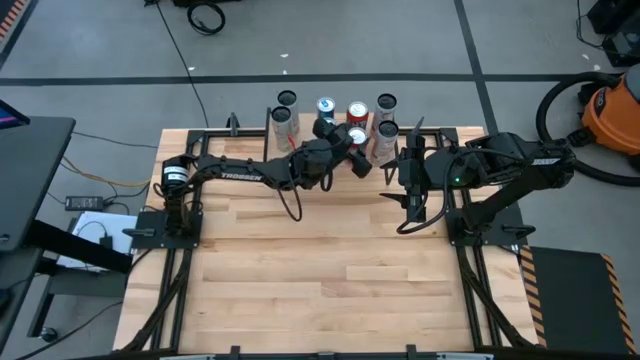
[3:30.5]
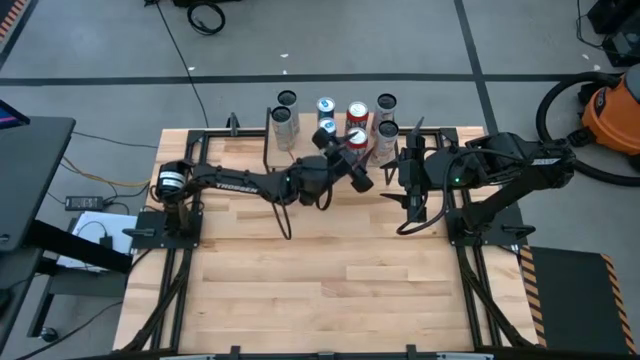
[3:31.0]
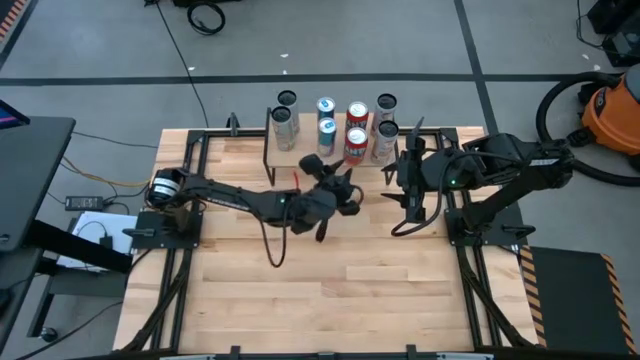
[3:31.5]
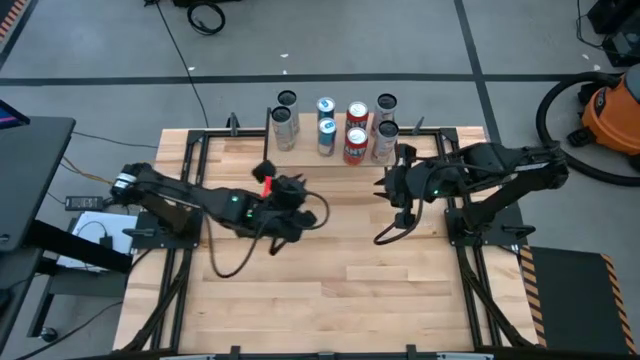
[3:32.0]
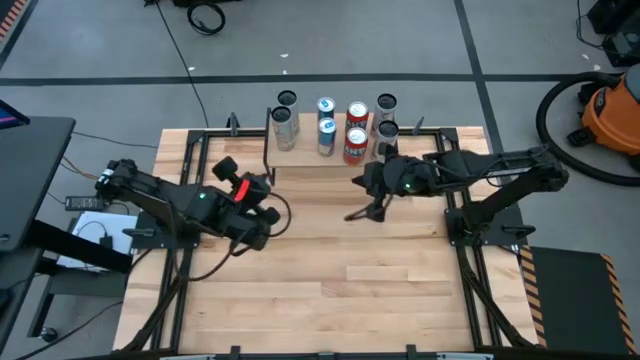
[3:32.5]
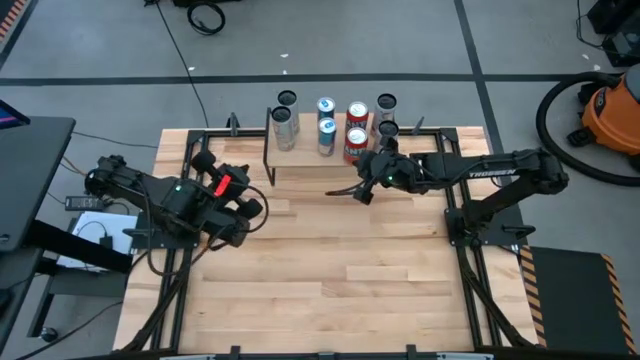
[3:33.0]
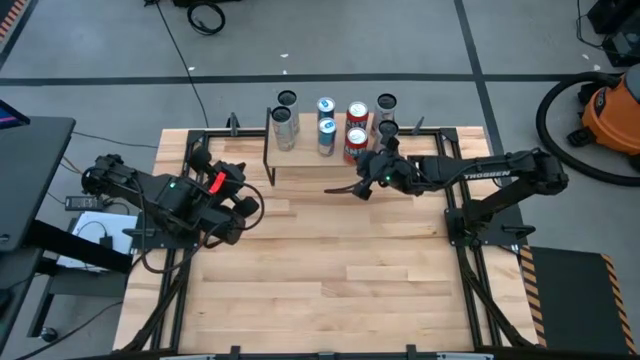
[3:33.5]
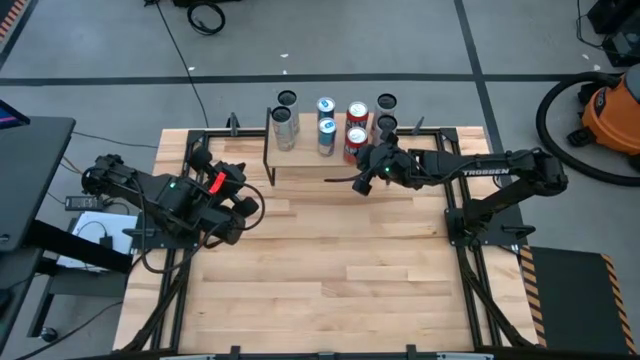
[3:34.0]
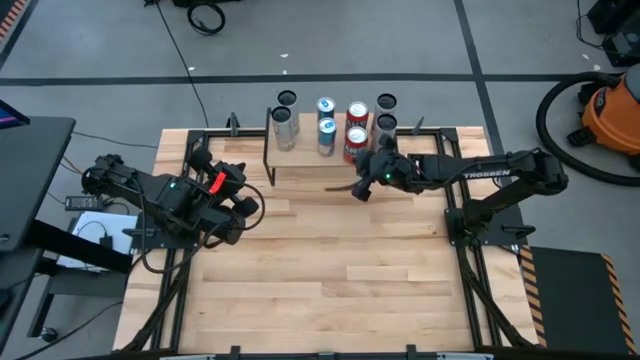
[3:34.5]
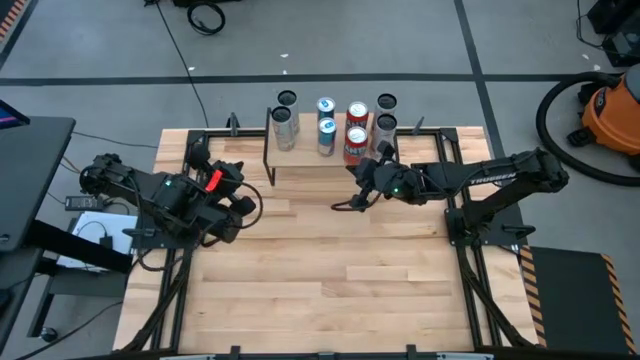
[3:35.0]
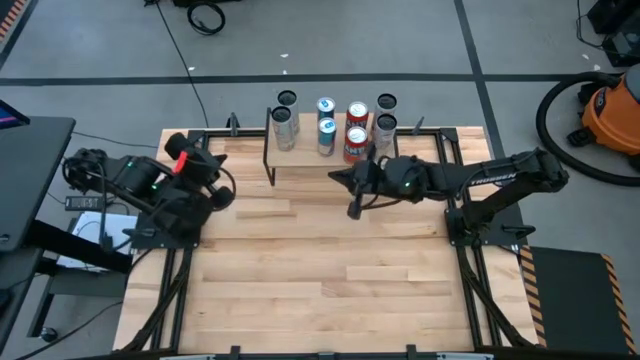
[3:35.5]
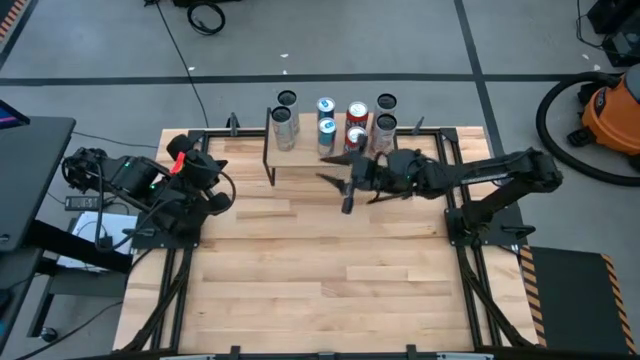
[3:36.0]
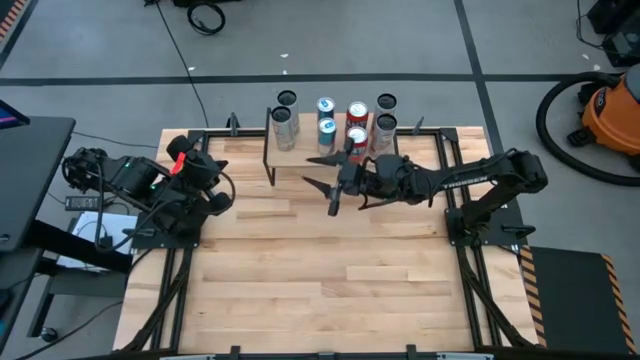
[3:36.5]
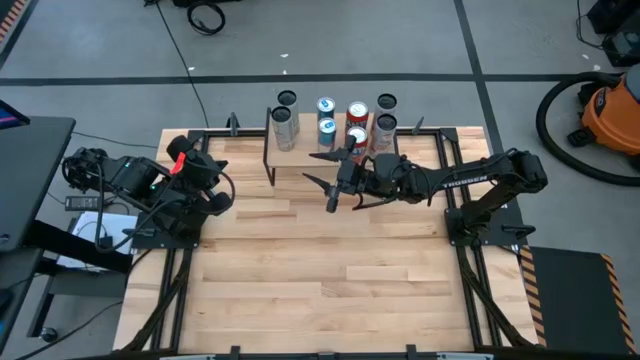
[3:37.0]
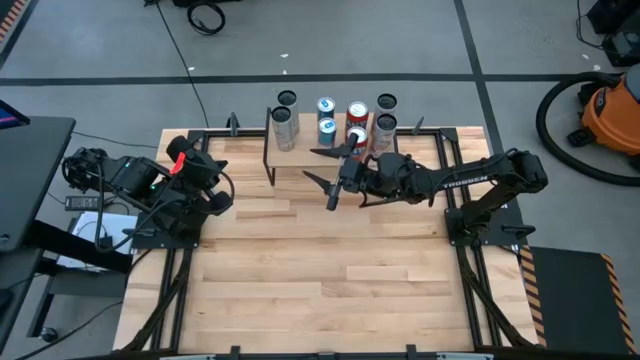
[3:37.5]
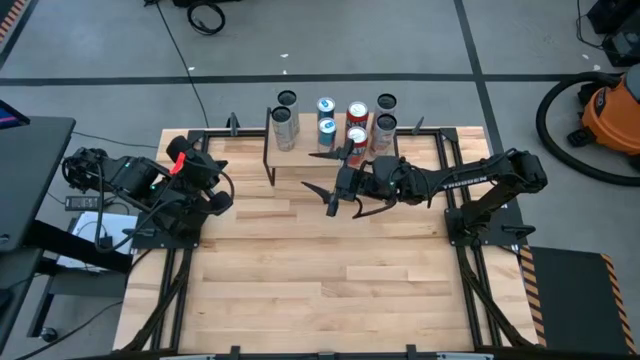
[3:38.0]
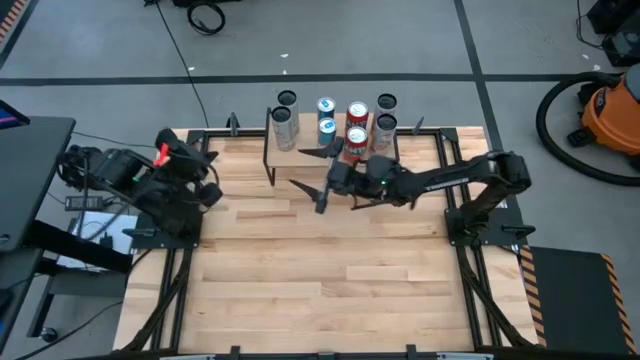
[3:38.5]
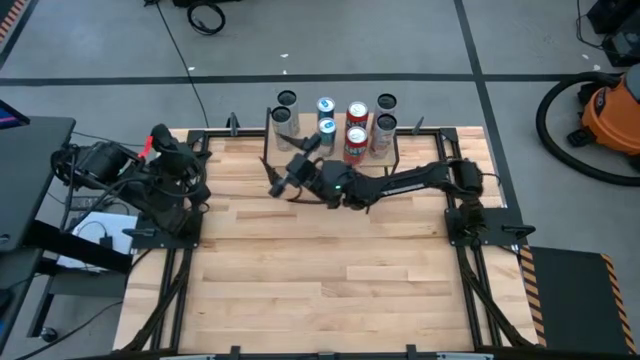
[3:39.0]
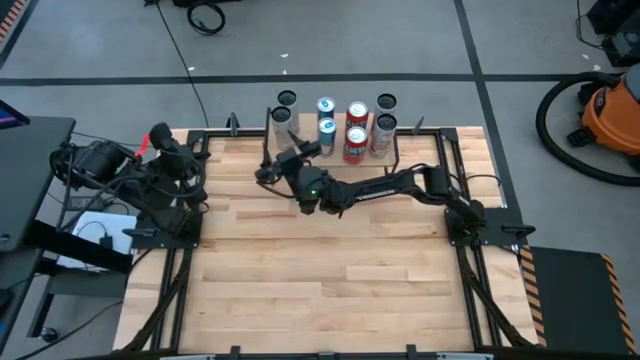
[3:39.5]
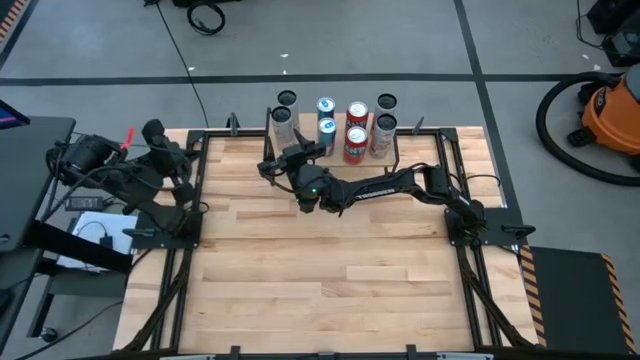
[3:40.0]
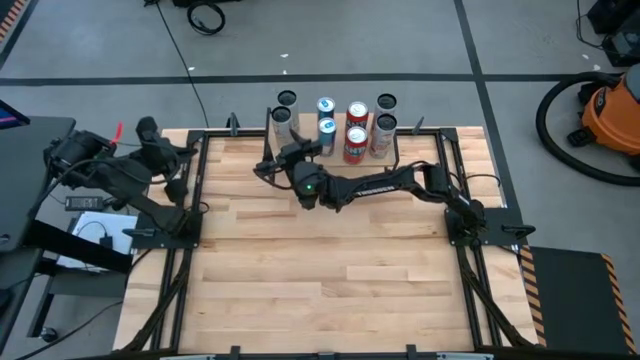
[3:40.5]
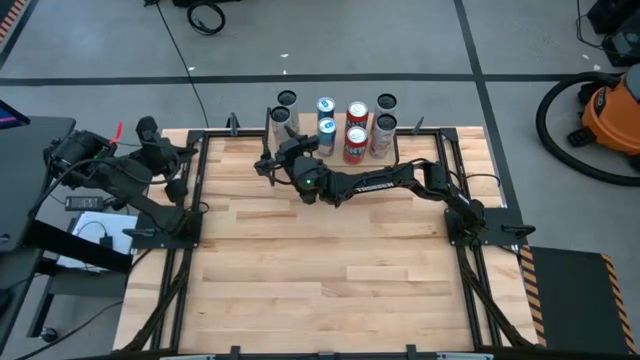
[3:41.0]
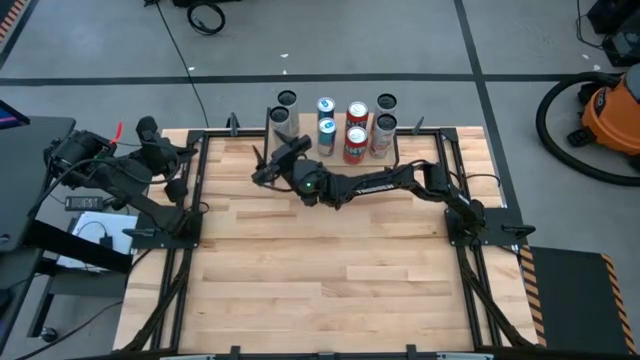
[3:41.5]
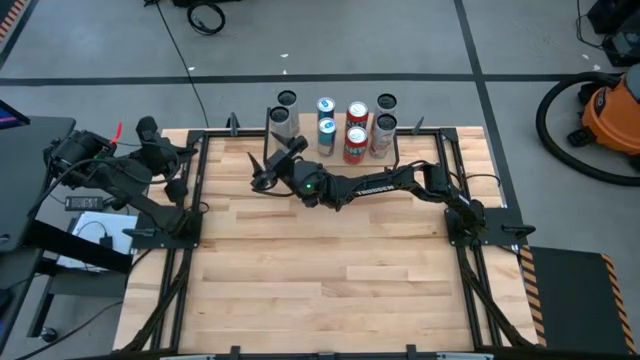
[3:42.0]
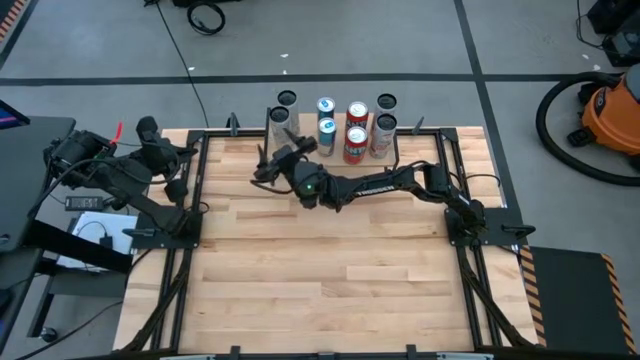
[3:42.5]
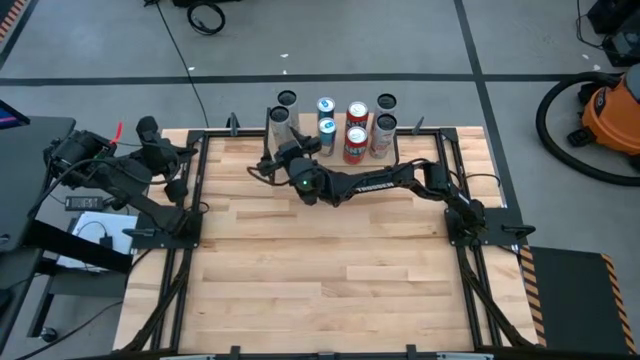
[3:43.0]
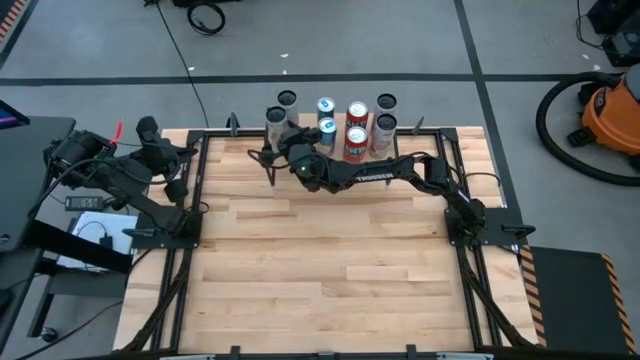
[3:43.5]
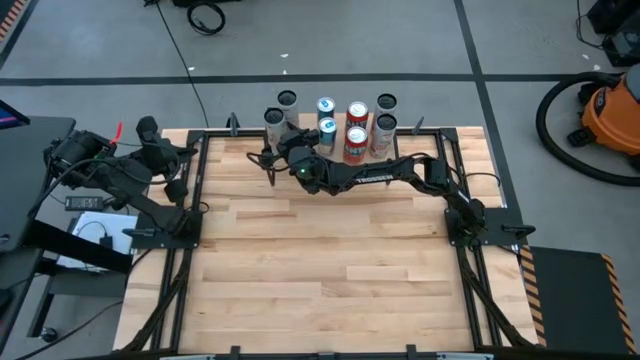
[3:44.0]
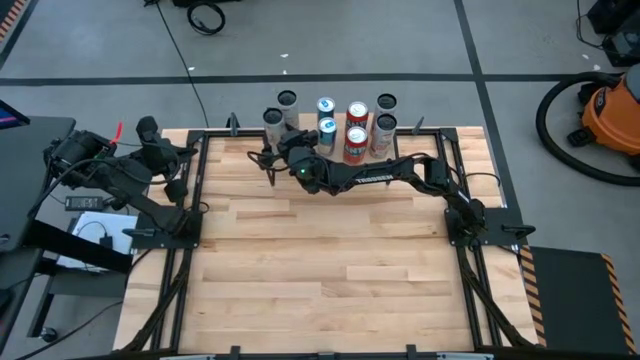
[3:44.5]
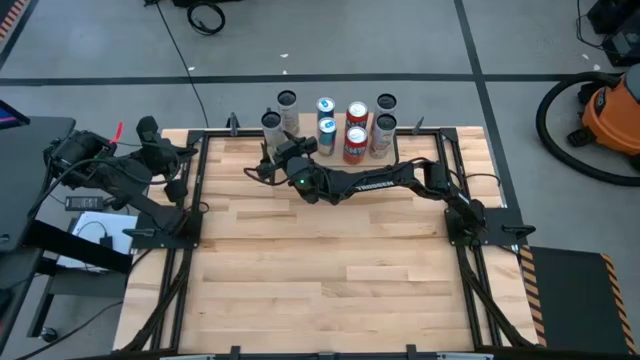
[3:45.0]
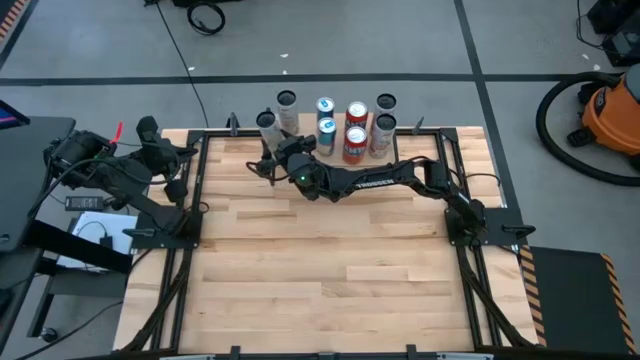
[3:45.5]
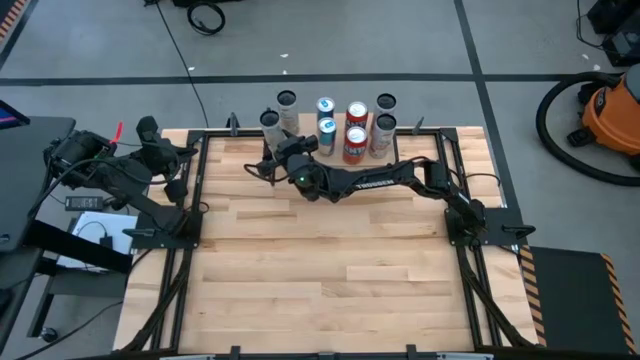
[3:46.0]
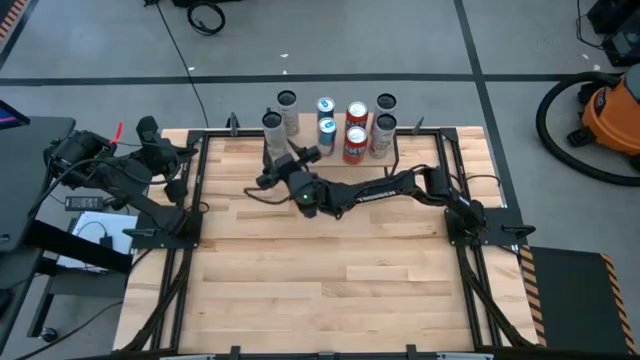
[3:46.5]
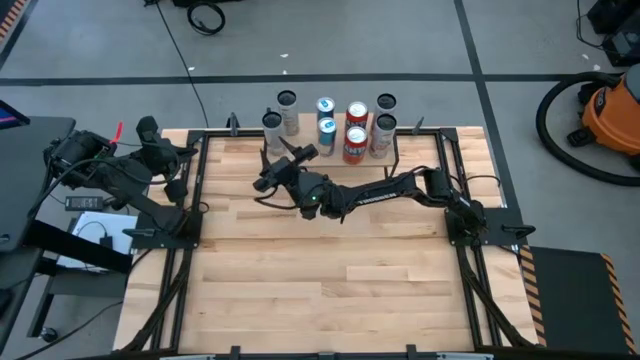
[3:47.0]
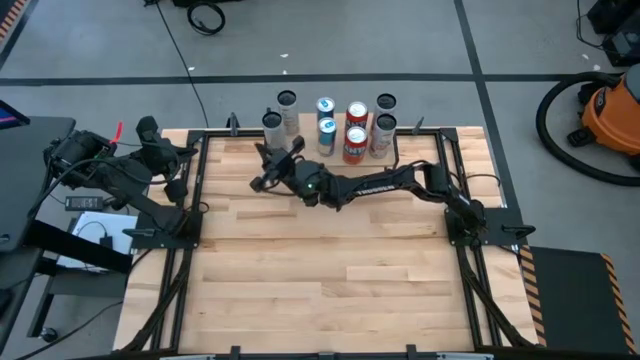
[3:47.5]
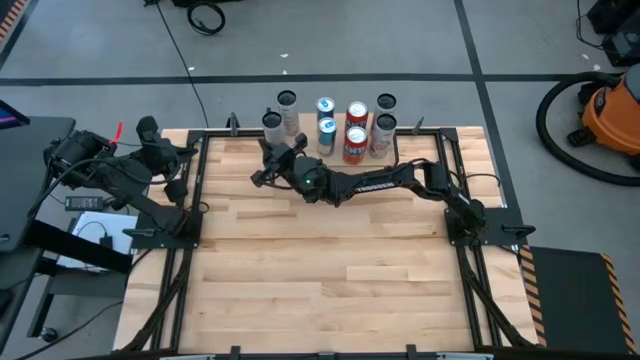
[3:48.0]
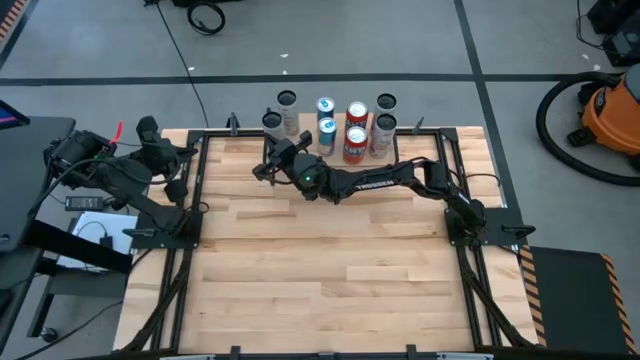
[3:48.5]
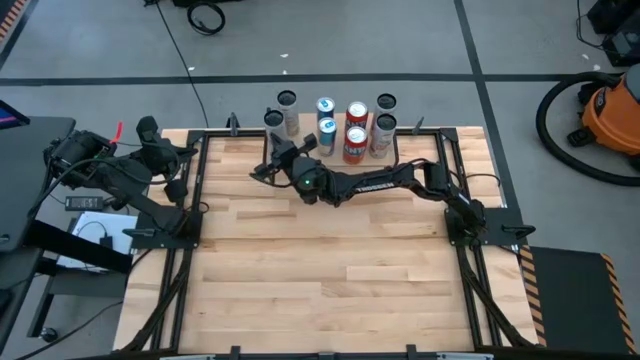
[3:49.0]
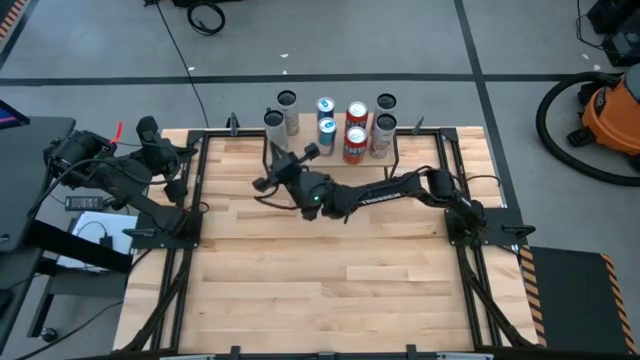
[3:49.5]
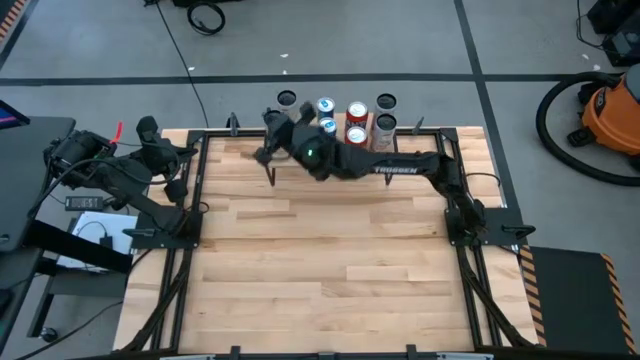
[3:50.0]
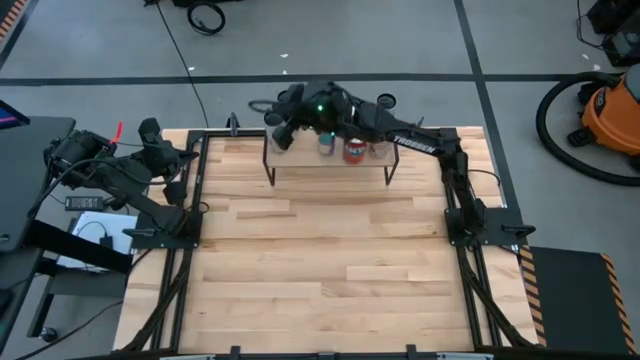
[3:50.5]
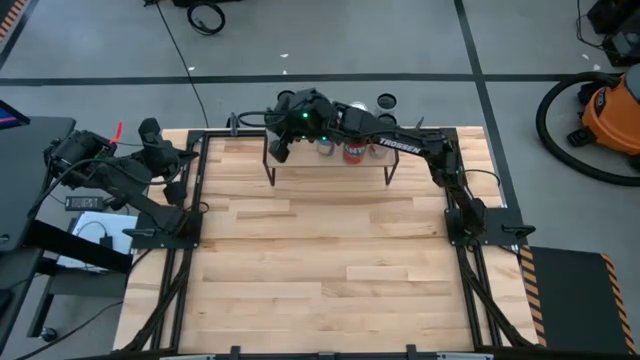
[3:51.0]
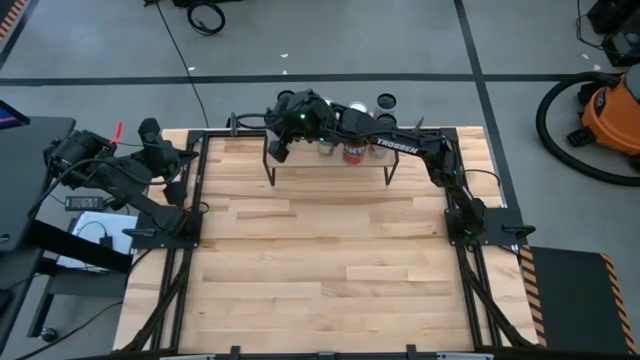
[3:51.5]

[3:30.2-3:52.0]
Task: Place canned beverage on shelf
Adjust the soda cans on the shelf
